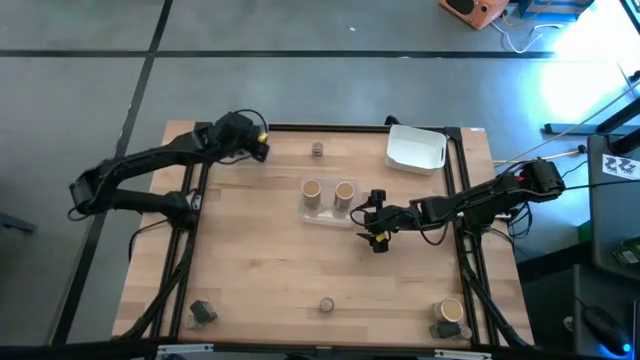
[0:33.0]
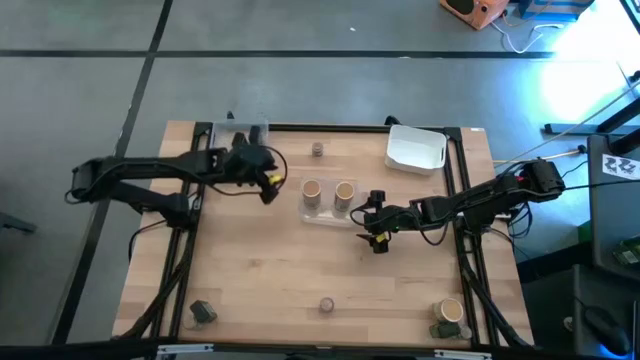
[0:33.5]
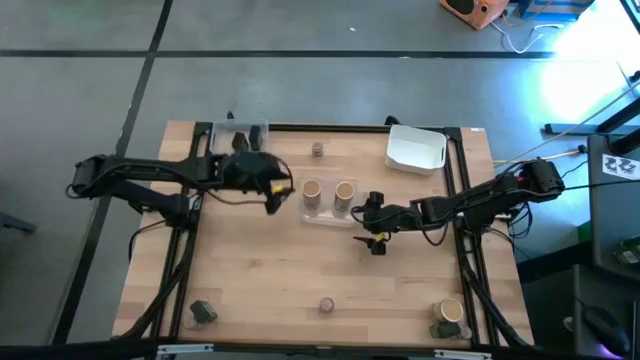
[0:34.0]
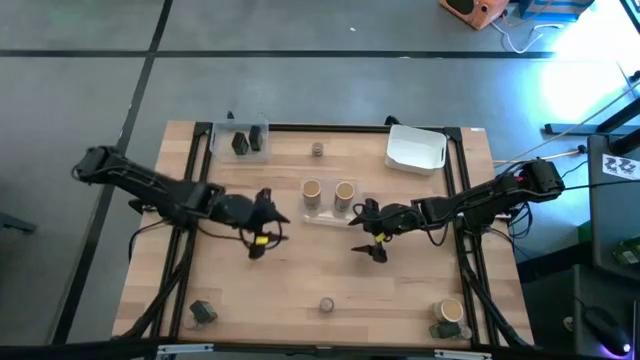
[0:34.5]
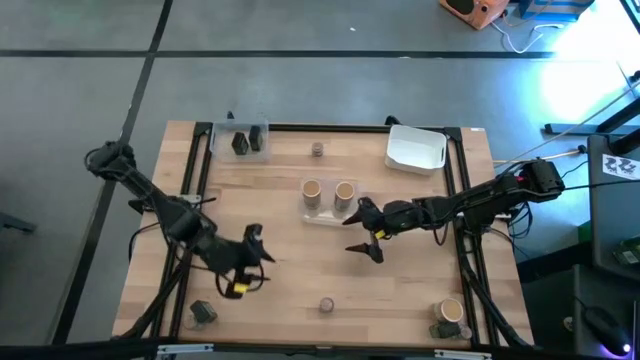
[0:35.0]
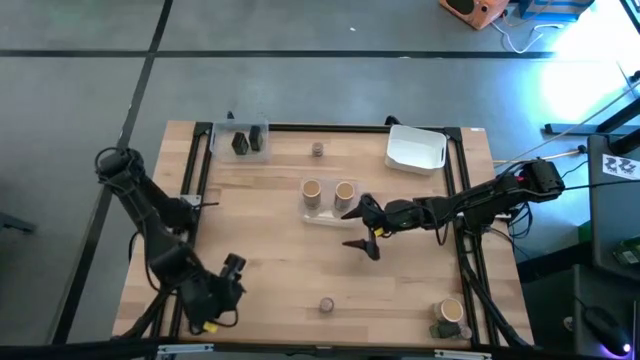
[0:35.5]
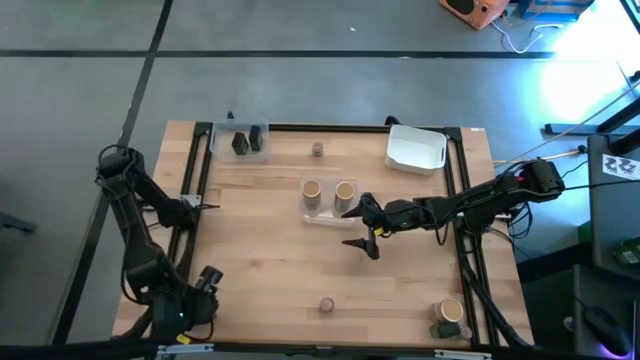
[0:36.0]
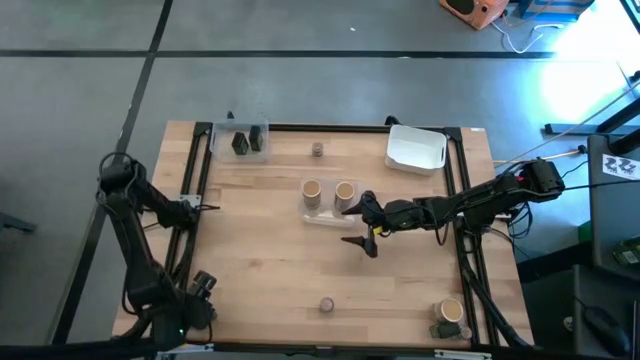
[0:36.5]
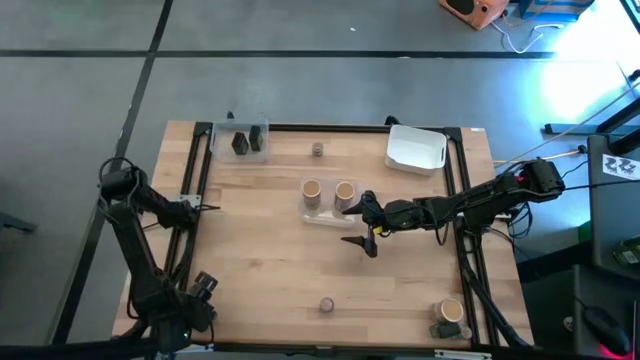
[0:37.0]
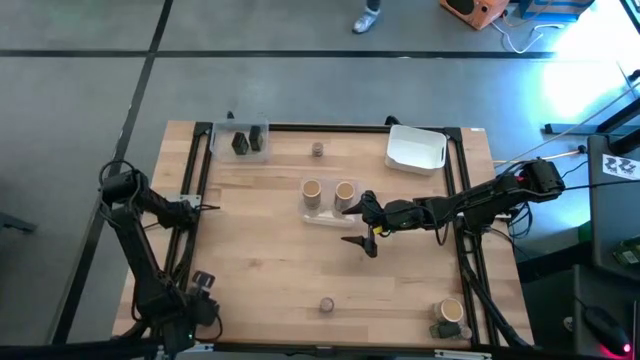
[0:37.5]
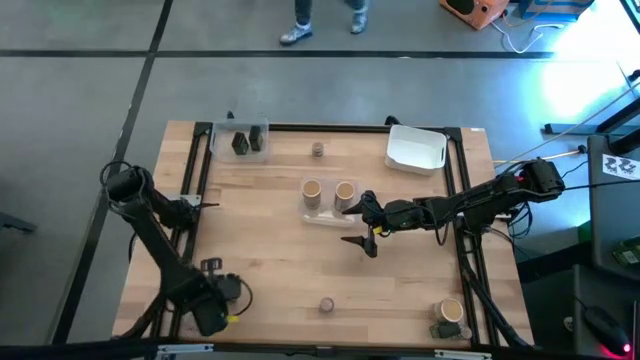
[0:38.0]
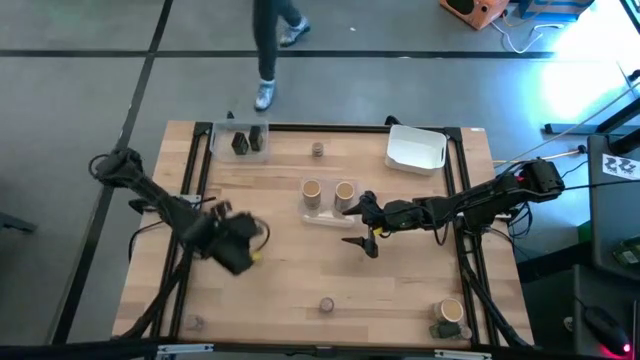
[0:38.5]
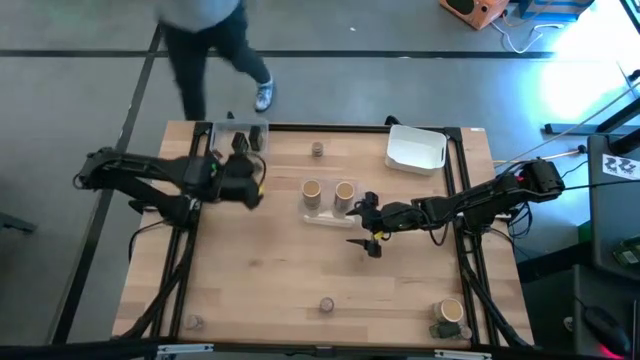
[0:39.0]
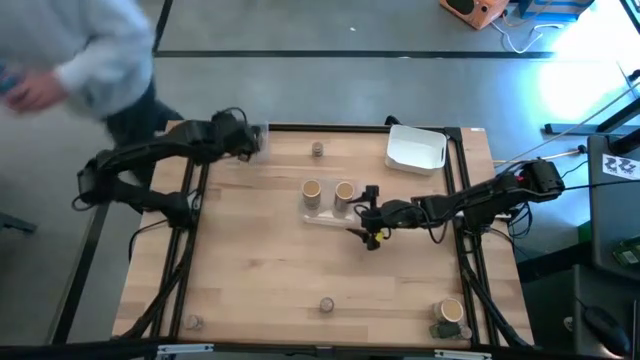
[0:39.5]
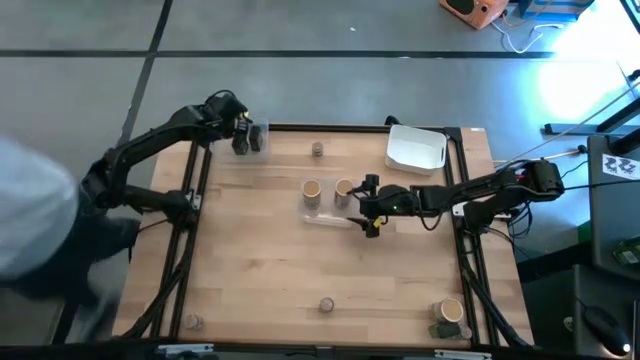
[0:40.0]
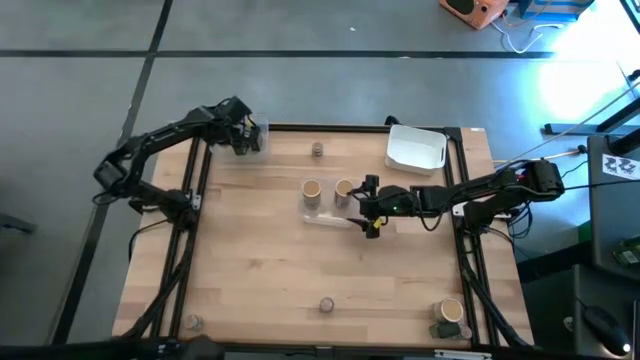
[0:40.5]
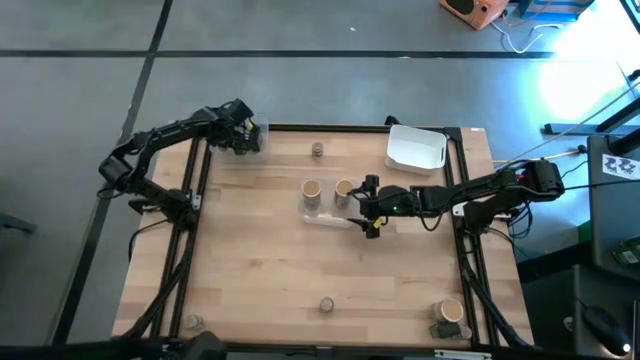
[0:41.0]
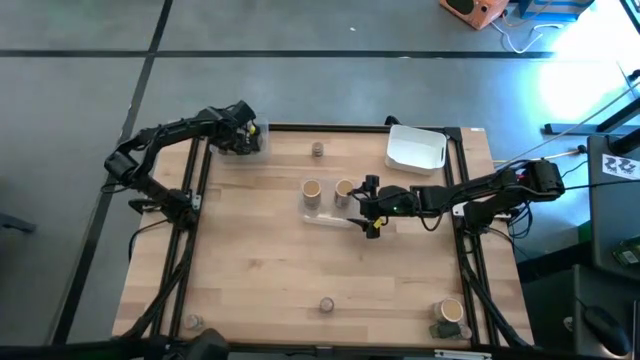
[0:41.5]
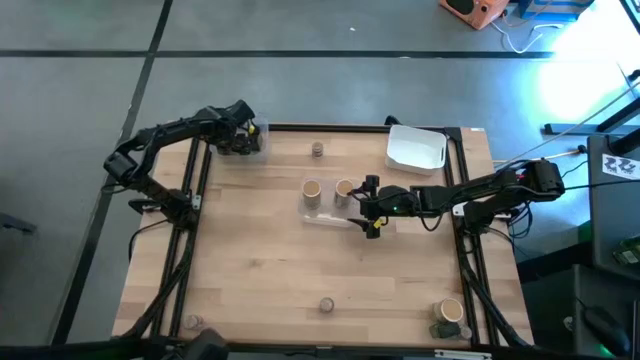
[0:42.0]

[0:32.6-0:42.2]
Task: Sort spices by type
Put the black seasoning can into the top transparent bin

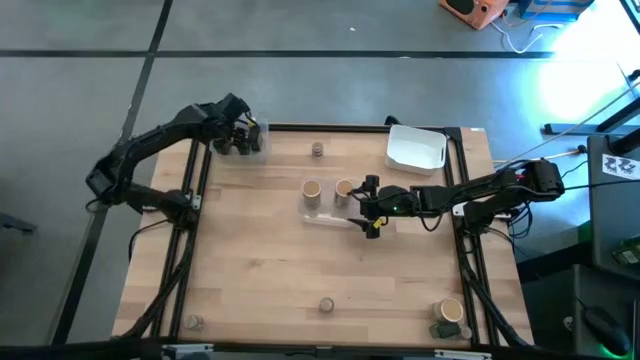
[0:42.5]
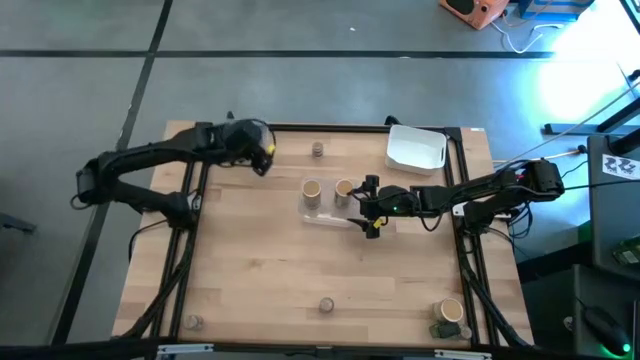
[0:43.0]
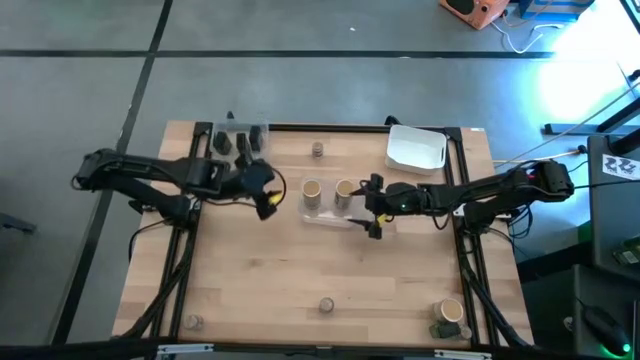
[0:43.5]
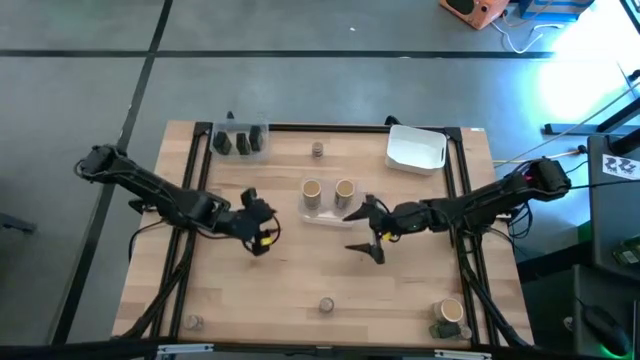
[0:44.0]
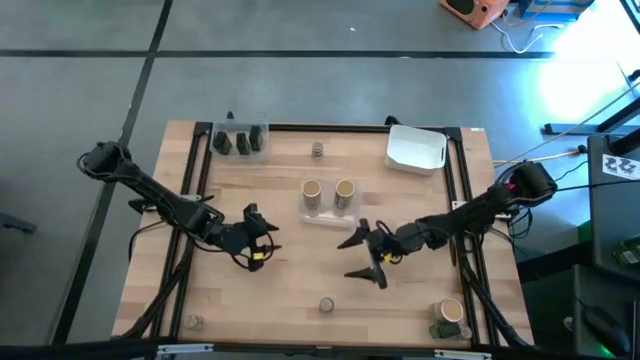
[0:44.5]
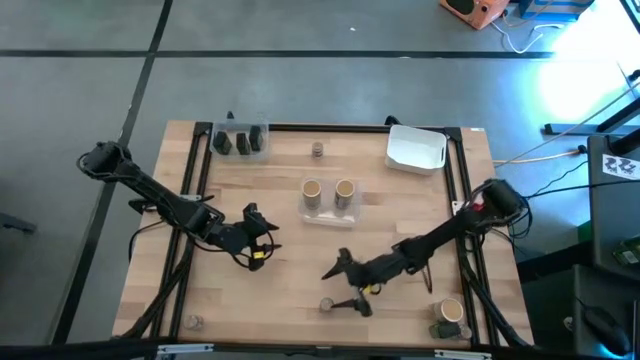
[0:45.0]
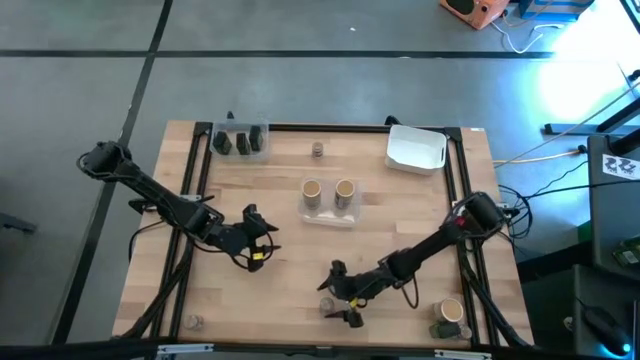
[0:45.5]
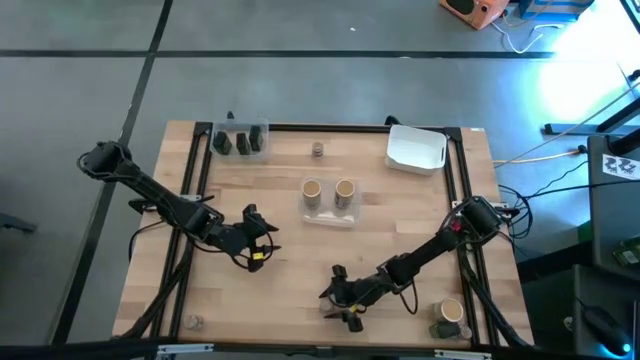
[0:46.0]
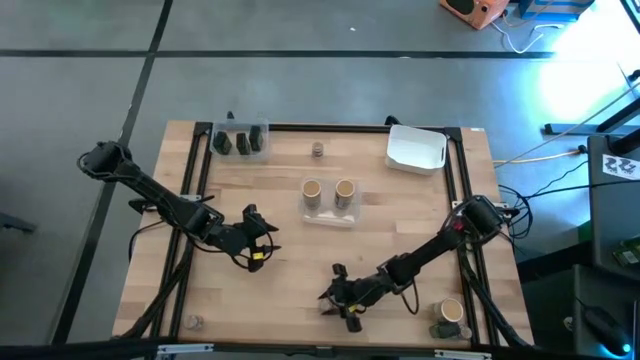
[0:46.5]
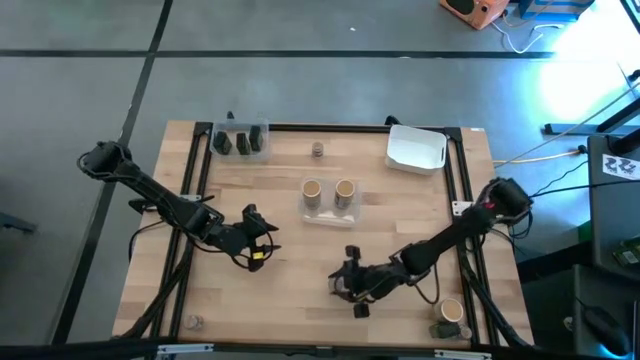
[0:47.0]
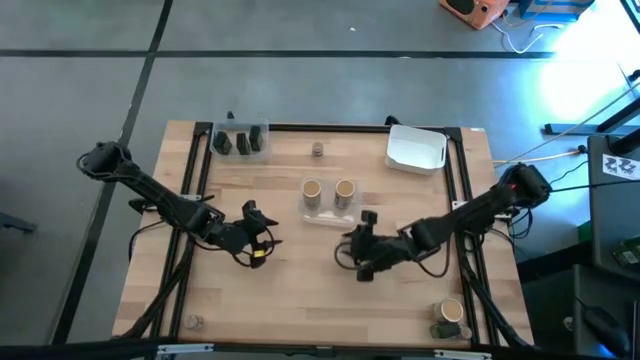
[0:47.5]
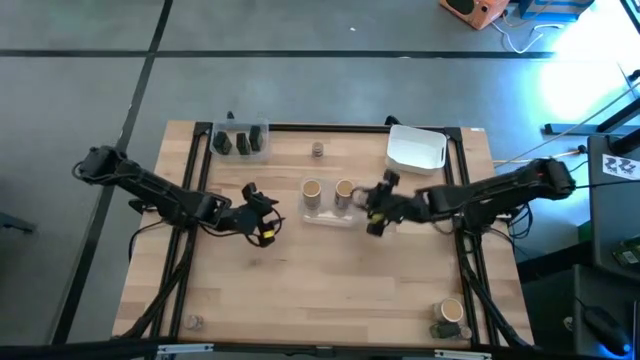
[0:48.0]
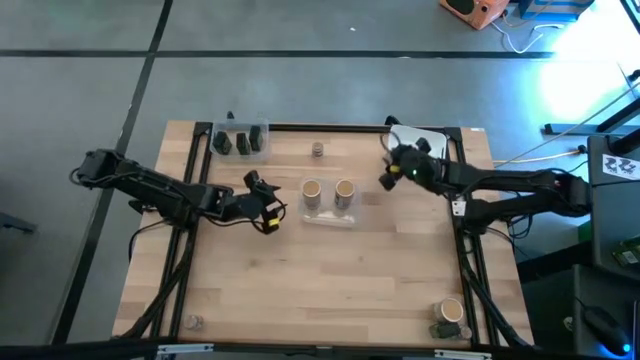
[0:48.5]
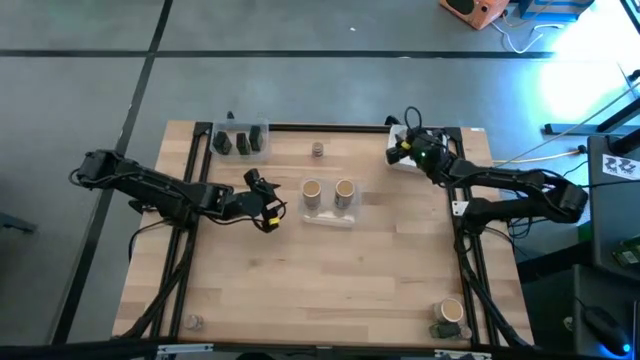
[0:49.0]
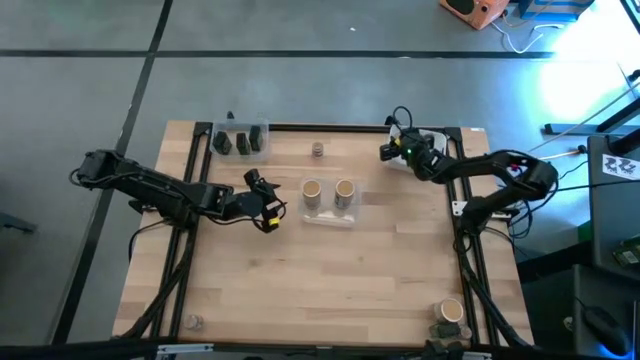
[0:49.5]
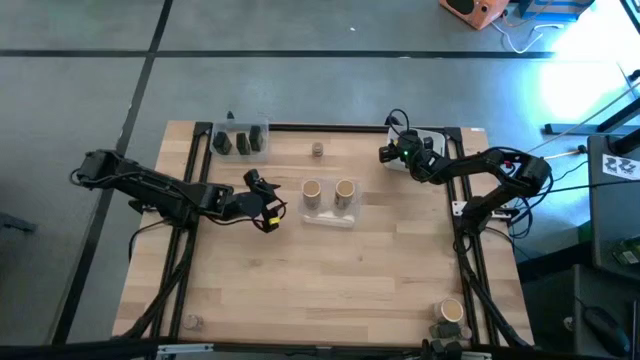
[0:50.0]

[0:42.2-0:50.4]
Put the brown seasoning bottle into white bin
